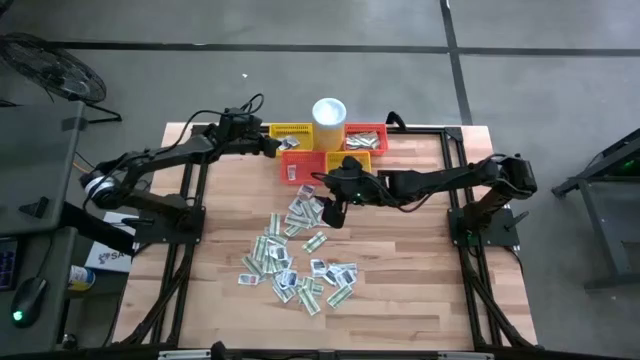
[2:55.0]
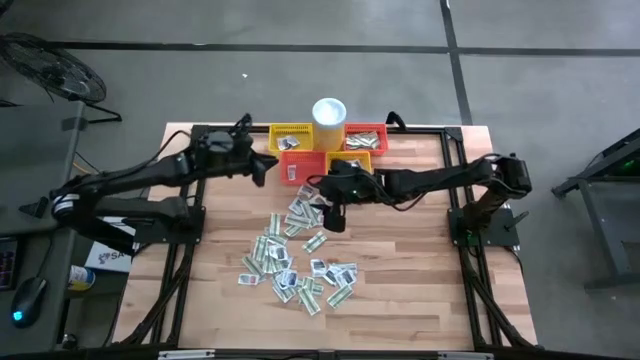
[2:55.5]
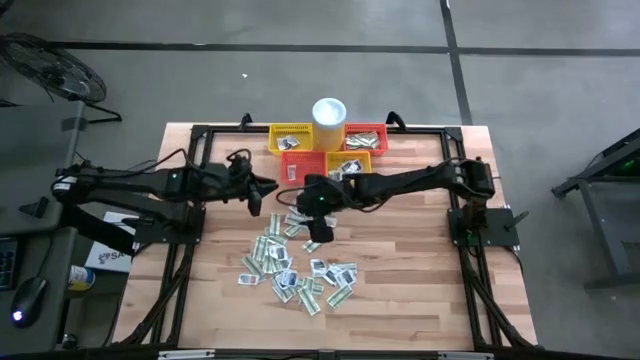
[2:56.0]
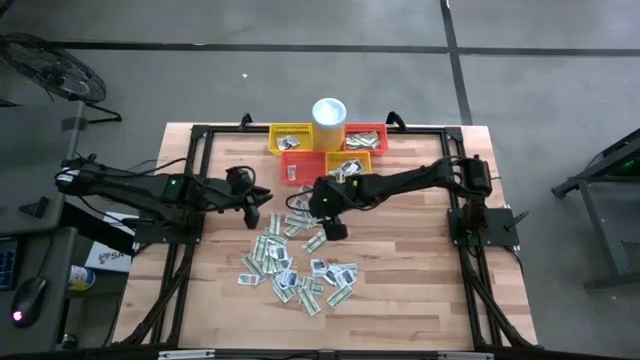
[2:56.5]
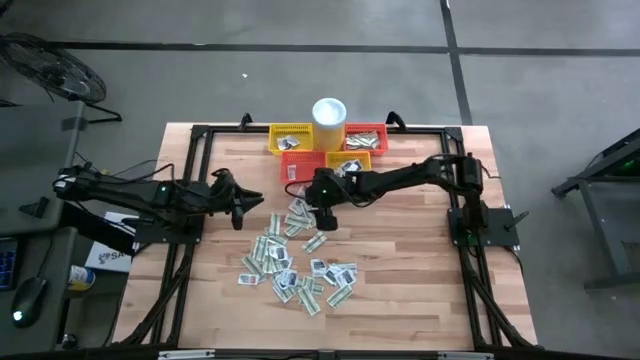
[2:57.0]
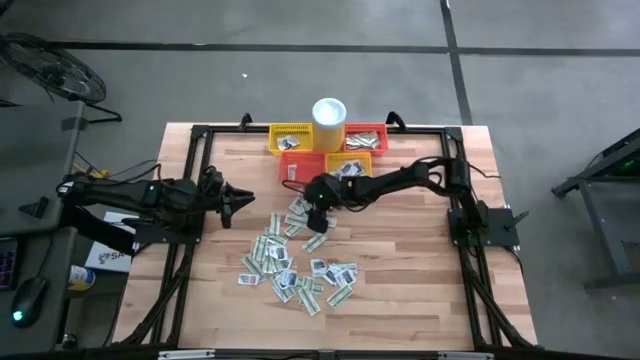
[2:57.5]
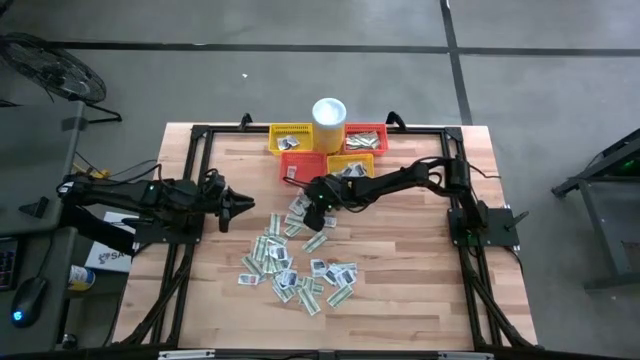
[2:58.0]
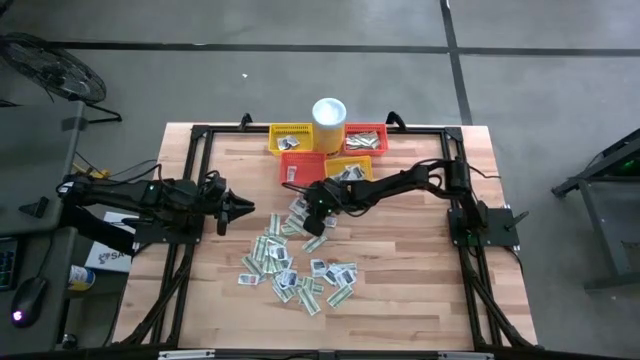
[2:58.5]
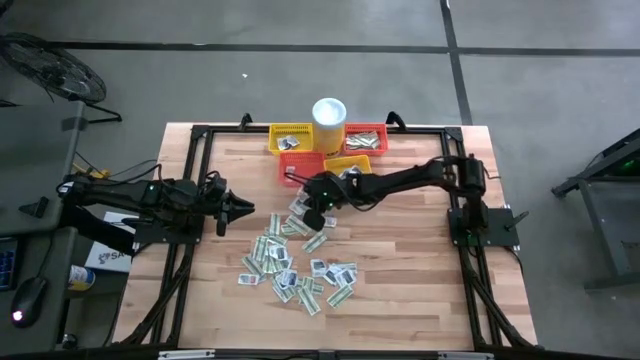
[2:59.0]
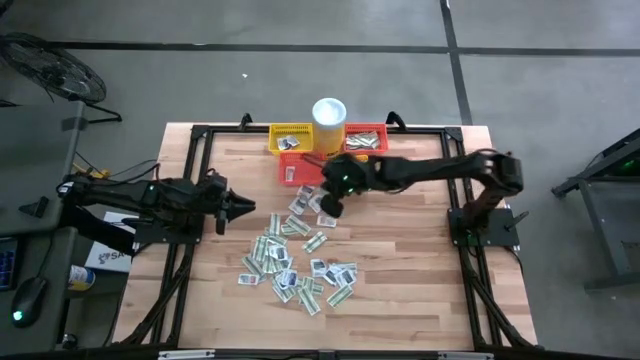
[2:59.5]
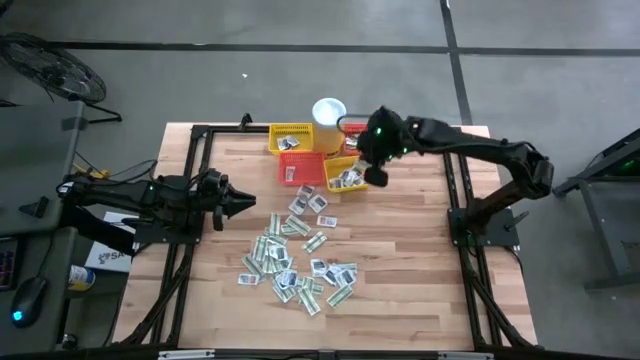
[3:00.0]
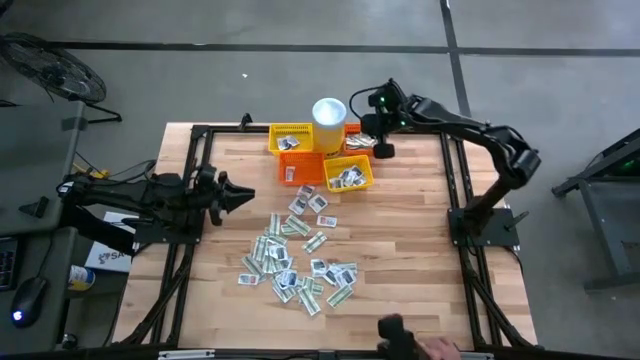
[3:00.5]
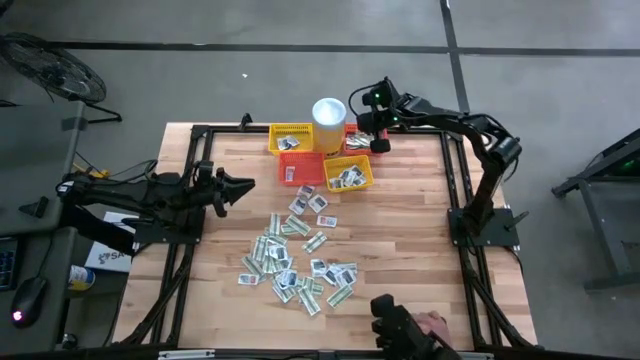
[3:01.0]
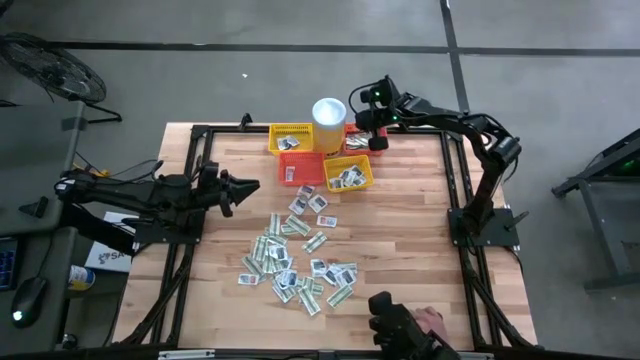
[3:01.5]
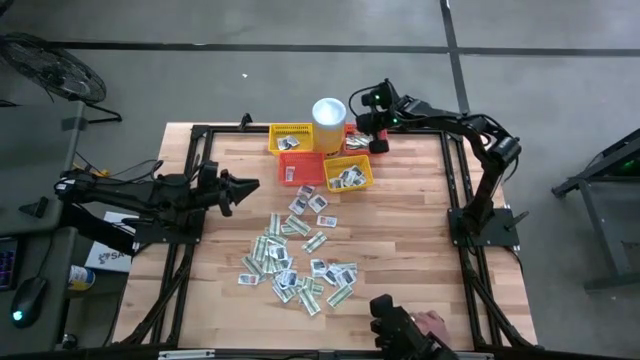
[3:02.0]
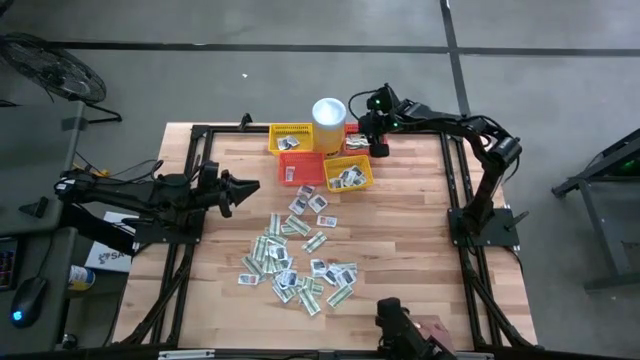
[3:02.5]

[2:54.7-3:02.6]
Task: Pick & Place First Aid Supplies
Put the green bandage pack into the top orange basket

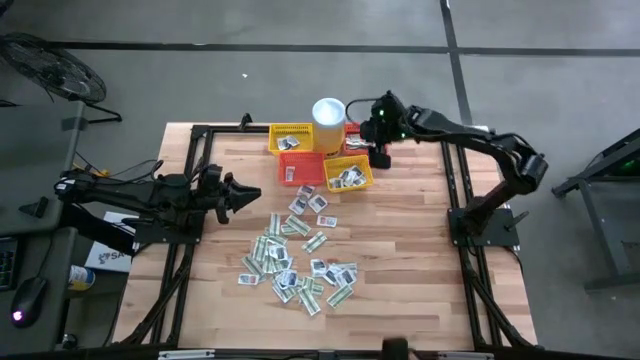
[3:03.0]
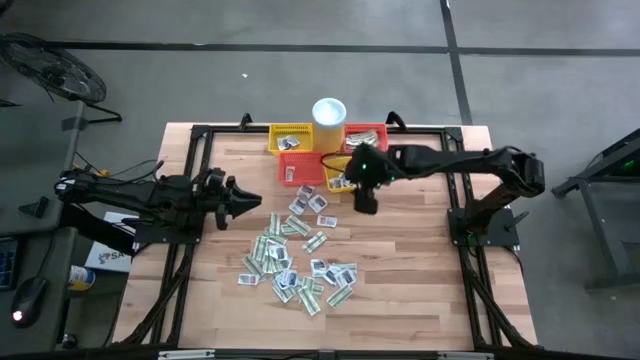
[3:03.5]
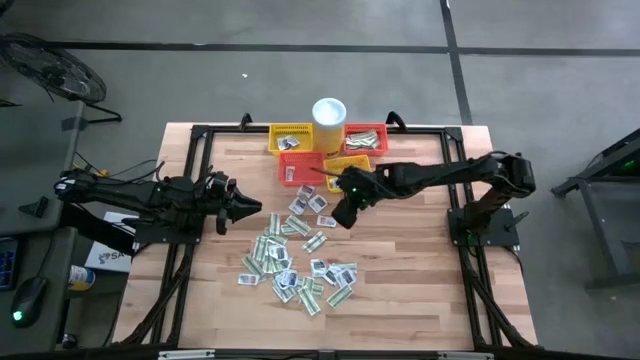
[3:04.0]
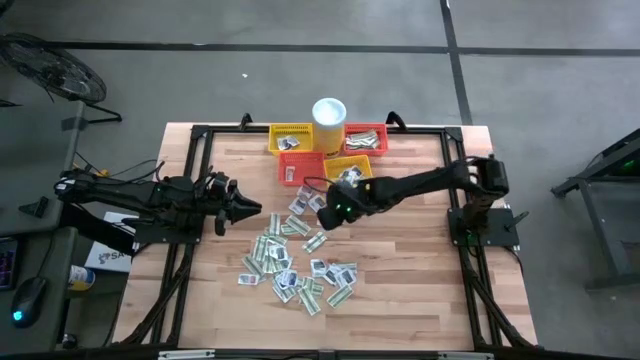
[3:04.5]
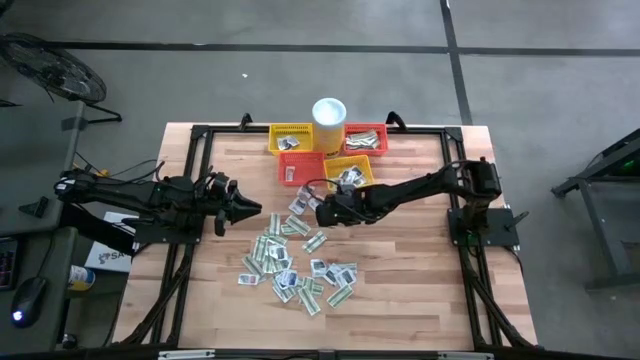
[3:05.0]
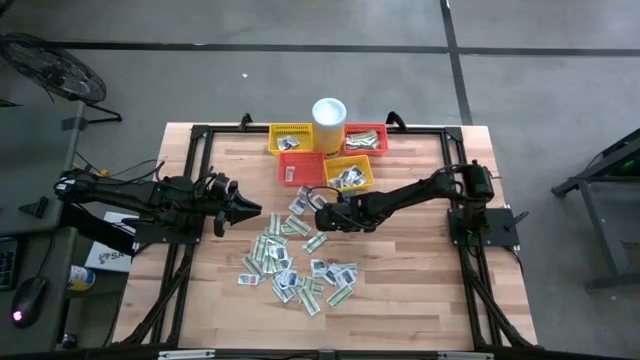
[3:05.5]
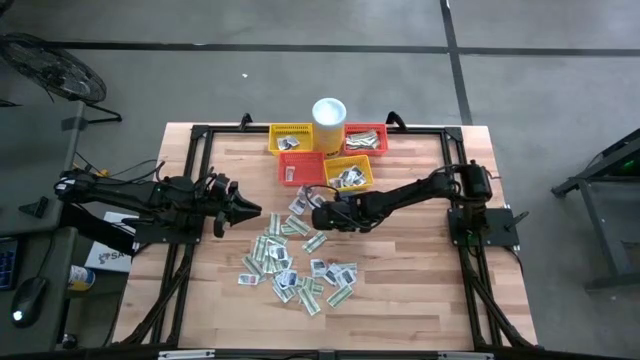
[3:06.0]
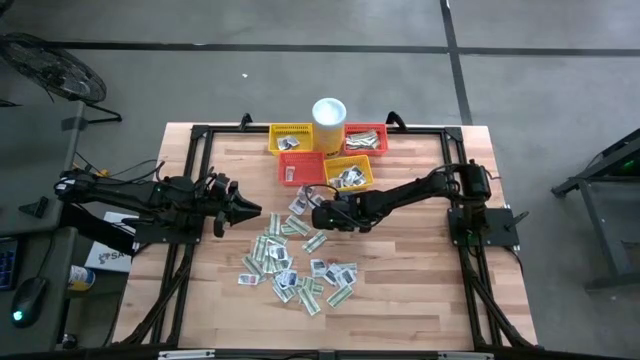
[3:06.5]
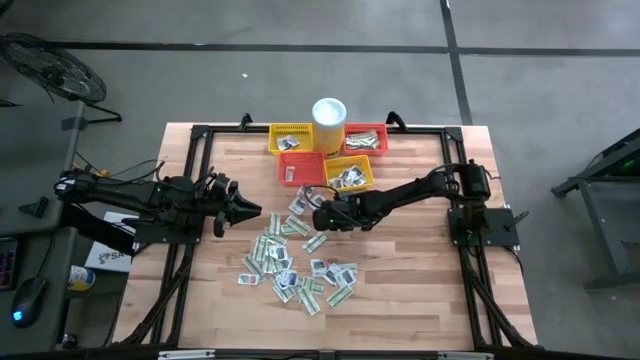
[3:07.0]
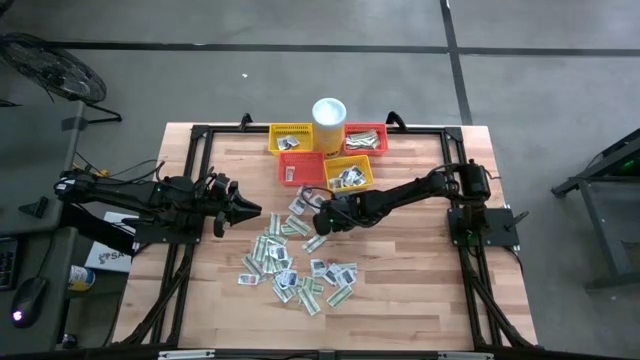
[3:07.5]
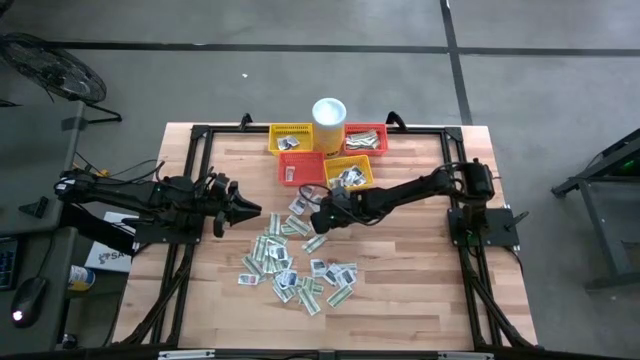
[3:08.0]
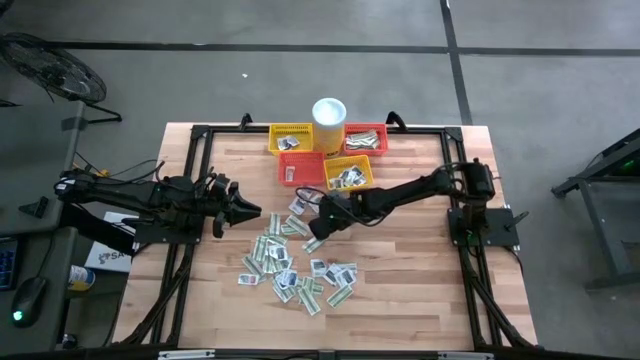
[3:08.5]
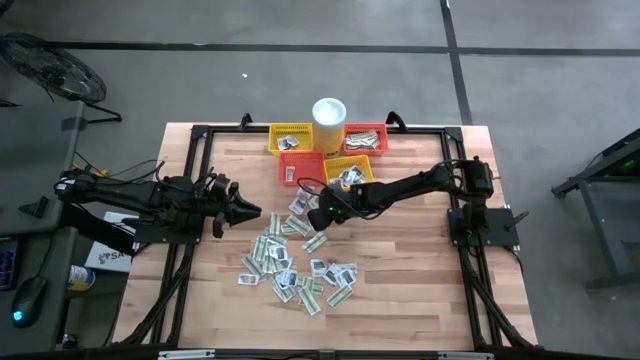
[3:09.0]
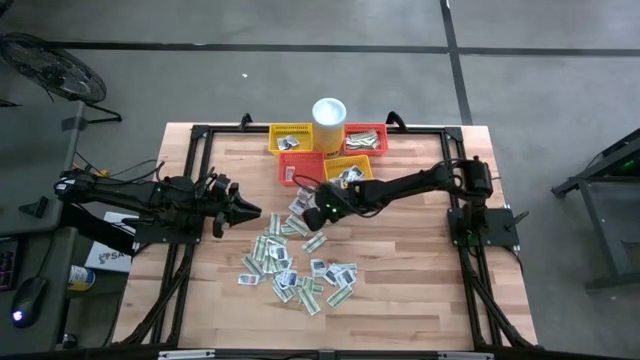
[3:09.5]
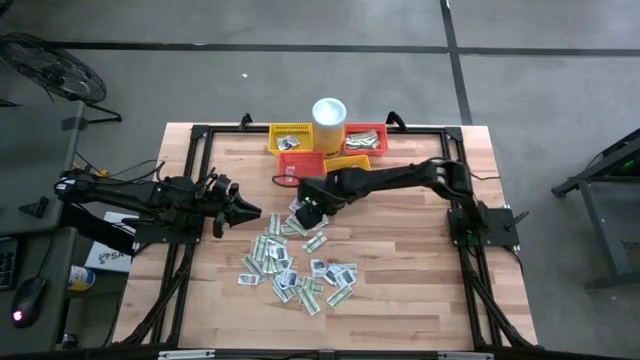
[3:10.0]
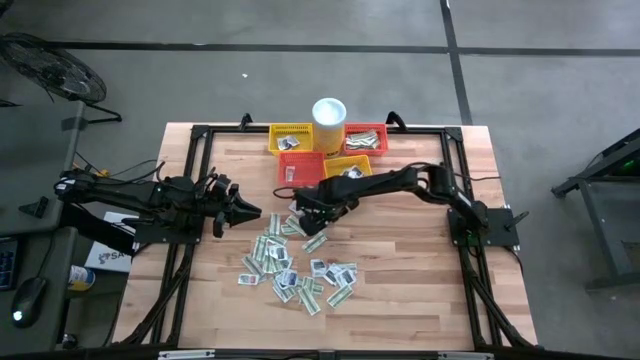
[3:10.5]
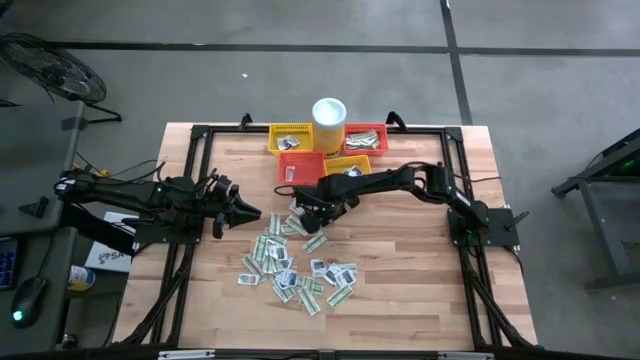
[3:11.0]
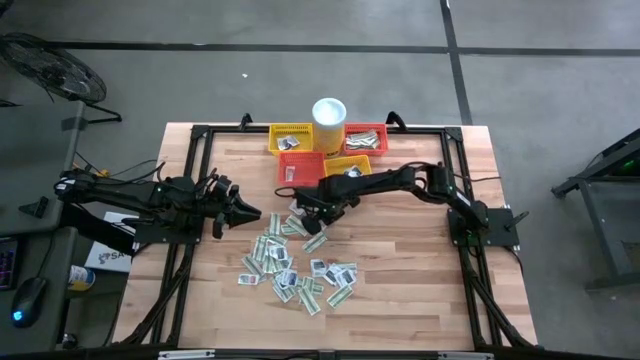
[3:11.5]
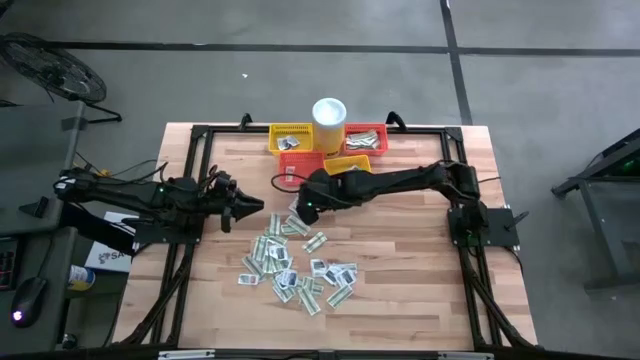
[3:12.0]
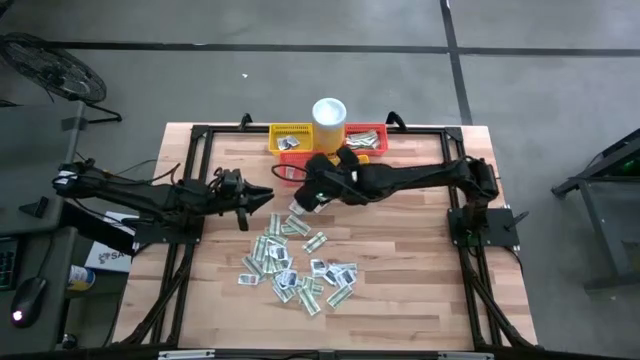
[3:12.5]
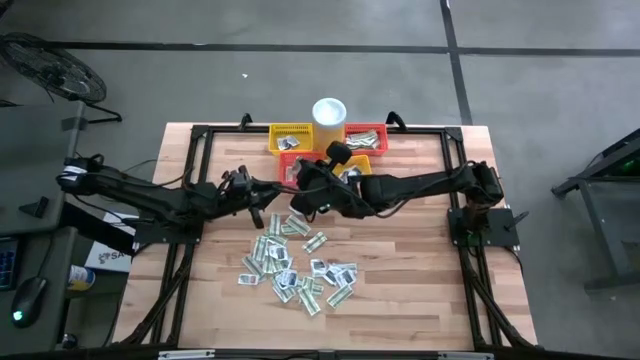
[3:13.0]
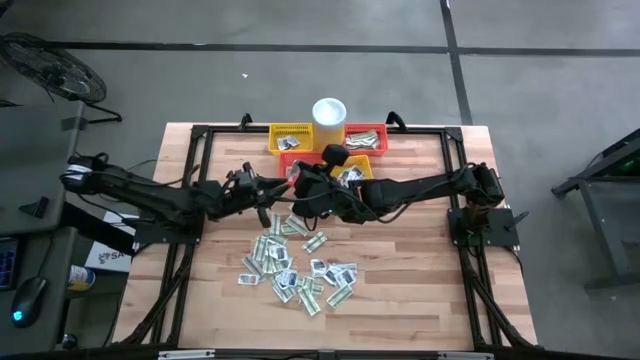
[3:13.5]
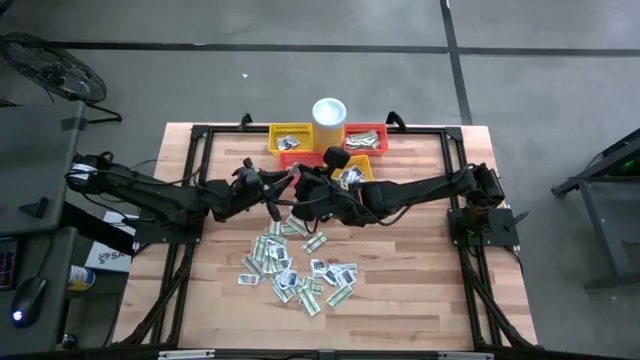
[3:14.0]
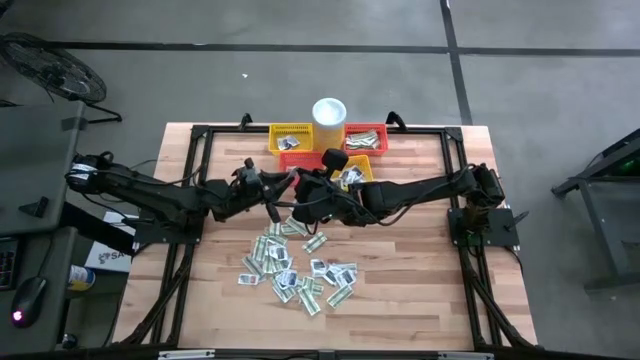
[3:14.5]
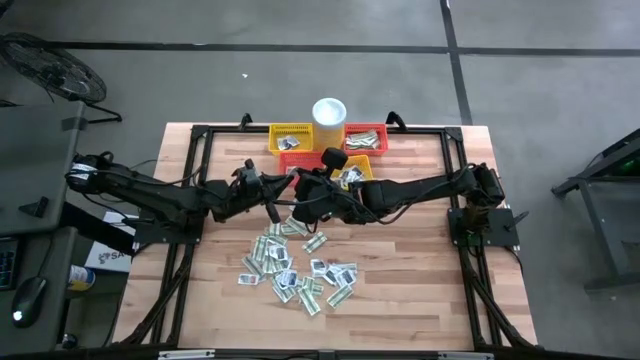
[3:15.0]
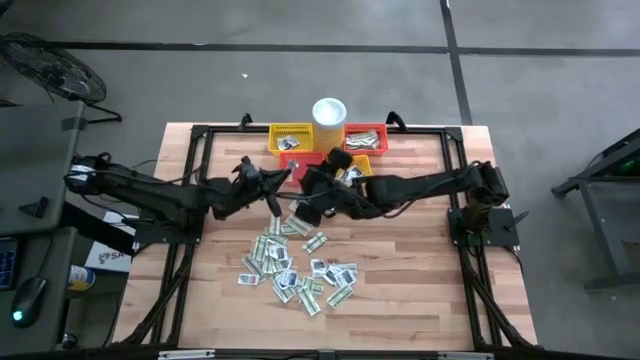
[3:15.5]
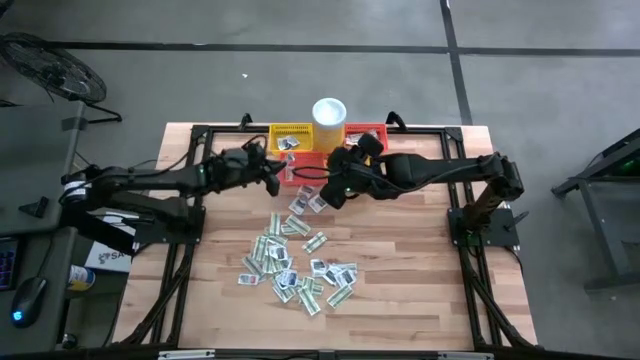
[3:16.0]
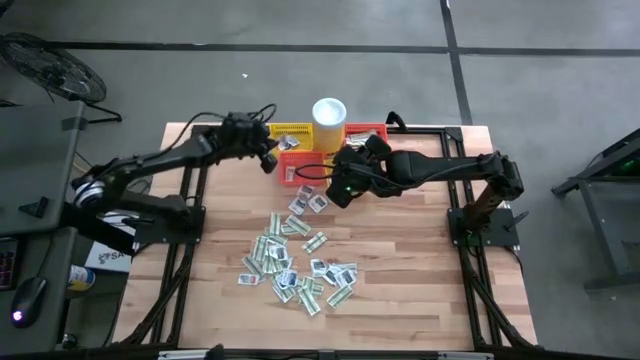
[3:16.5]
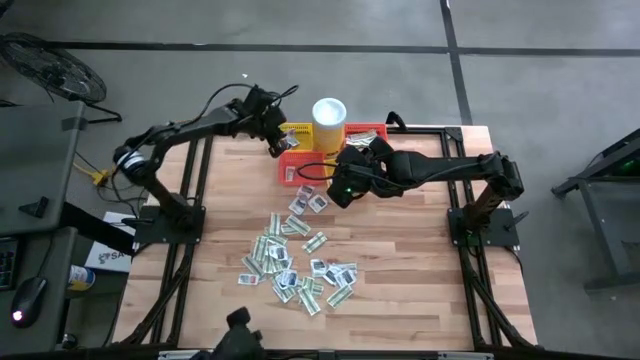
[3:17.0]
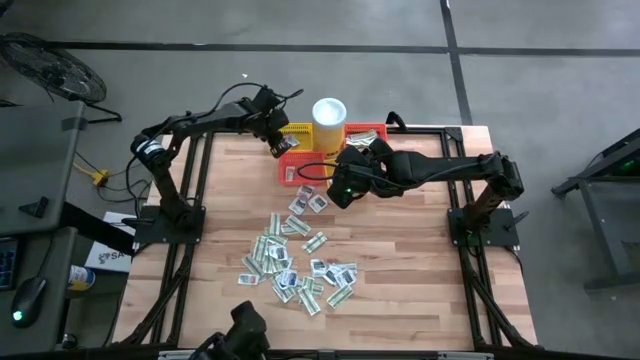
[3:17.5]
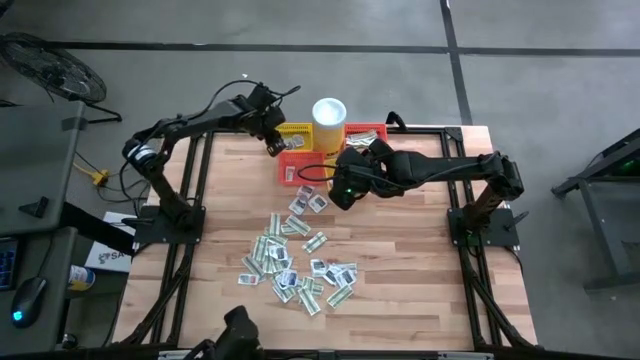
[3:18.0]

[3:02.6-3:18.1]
Put the orange ointment pack into the bottom orange basket
